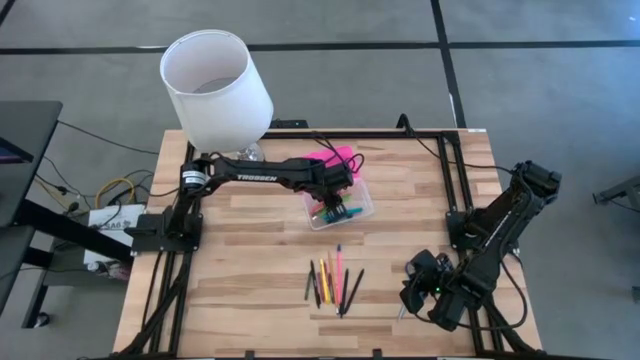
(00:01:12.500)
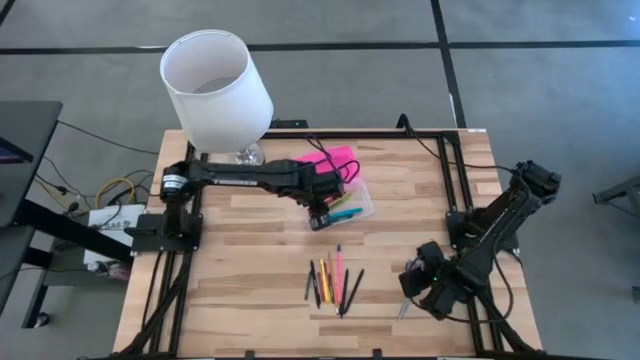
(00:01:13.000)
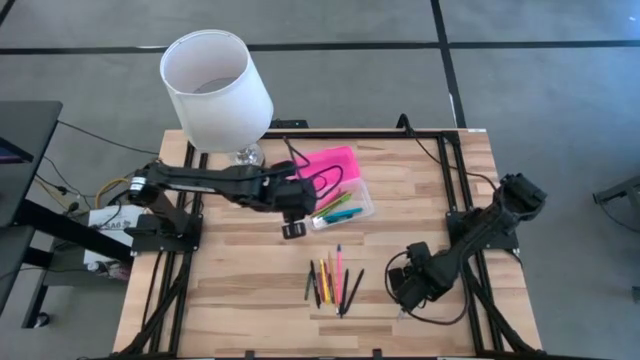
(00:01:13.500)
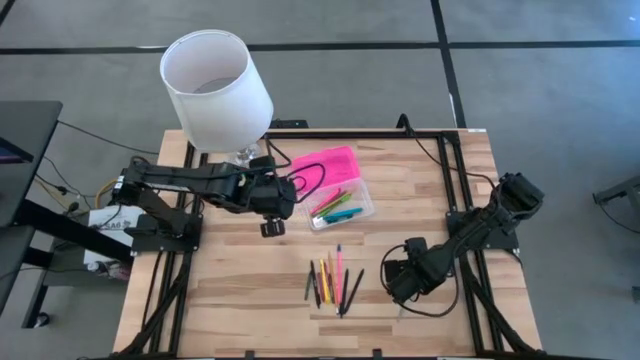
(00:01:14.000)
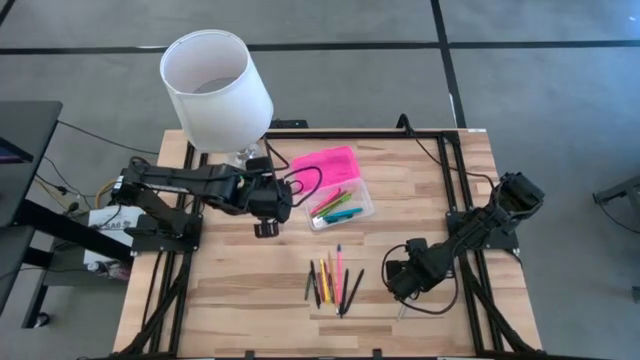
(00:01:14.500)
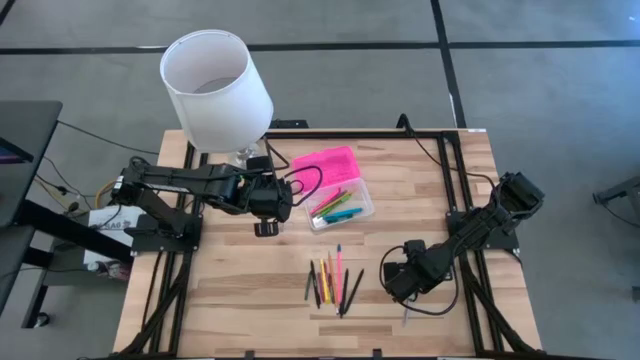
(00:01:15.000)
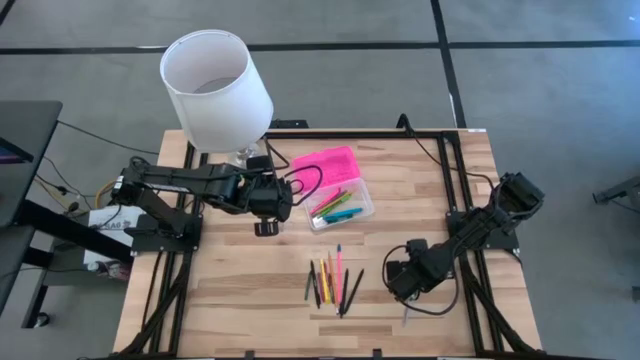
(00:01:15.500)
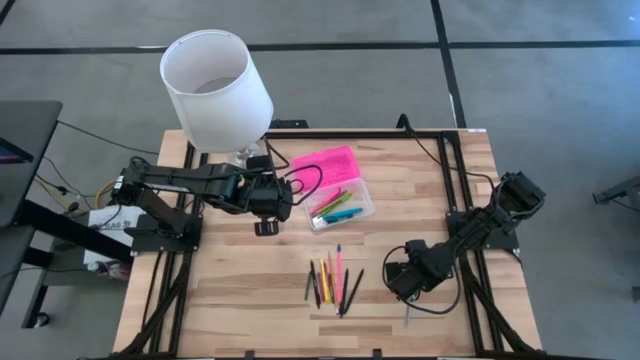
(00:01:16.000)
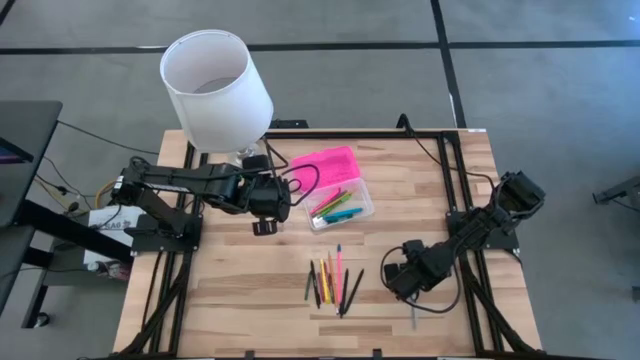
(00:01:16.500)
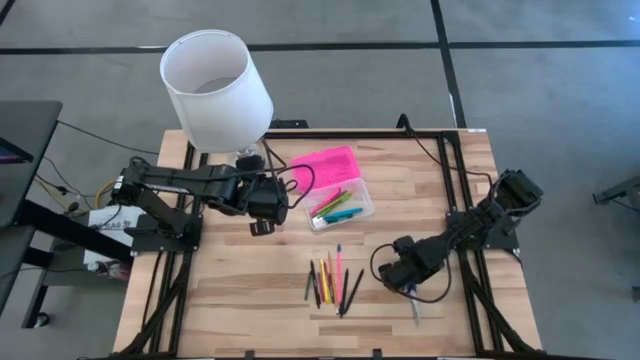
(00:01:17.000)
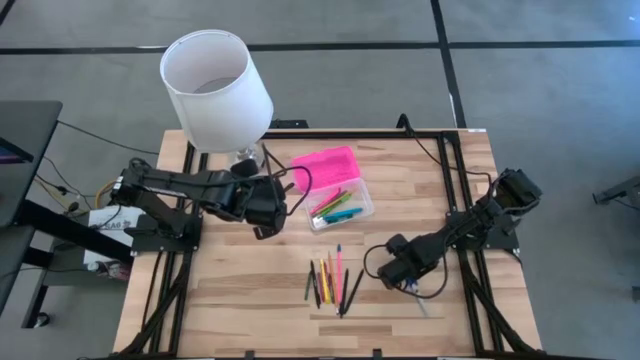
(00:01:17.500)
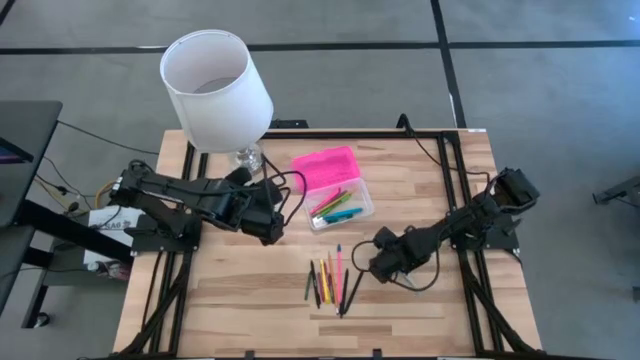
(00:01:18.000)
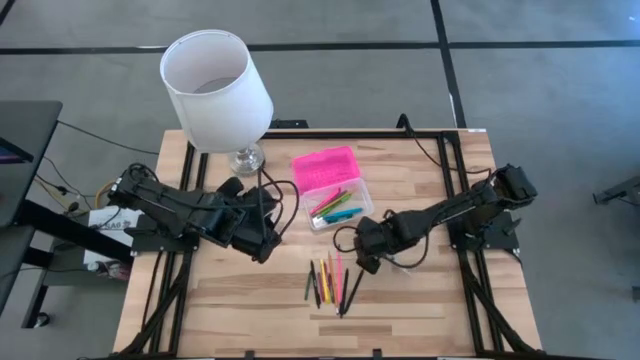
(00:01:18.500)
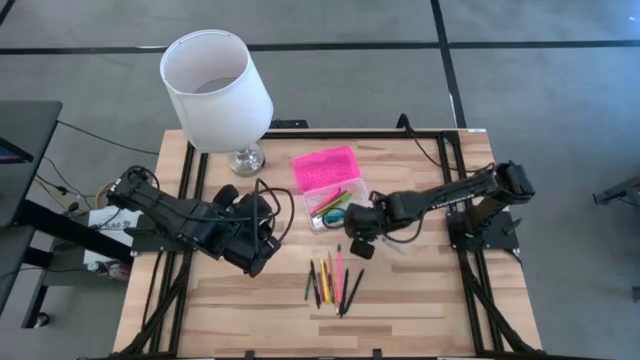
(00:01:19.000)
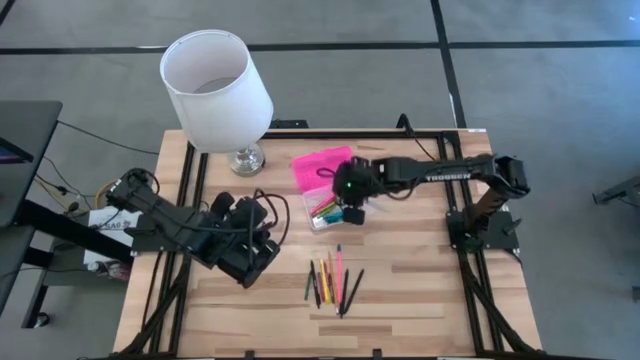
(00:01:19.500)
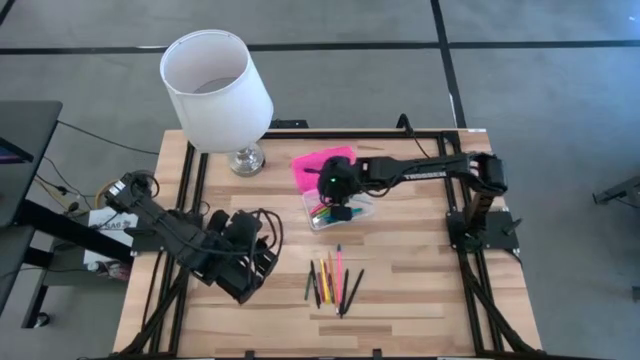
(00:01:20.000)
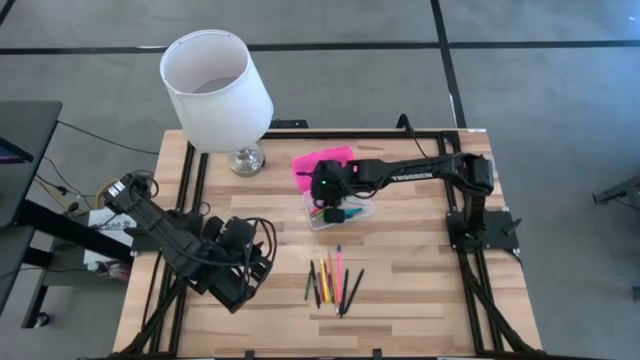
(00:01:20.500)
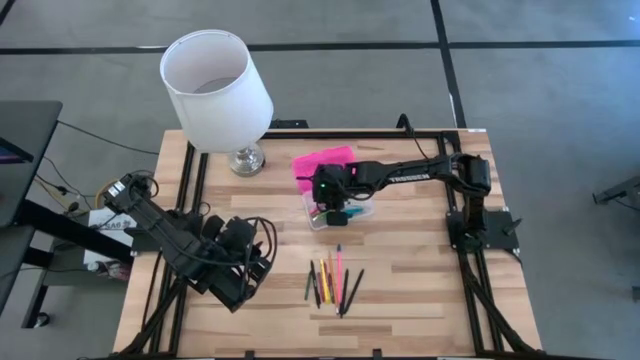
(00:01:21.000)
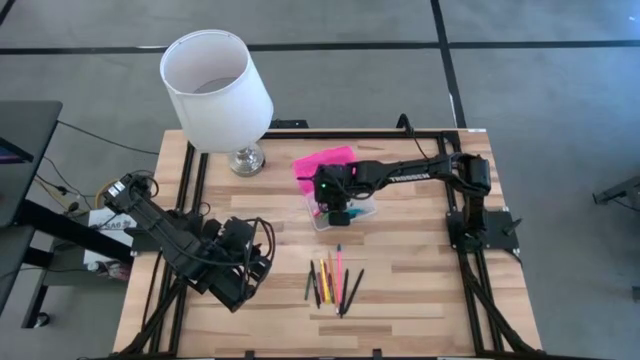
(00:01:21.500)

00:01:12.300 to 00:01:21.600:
Task: Pick & place school supplies into a supply box
Put the blue scissors into the pink supply box

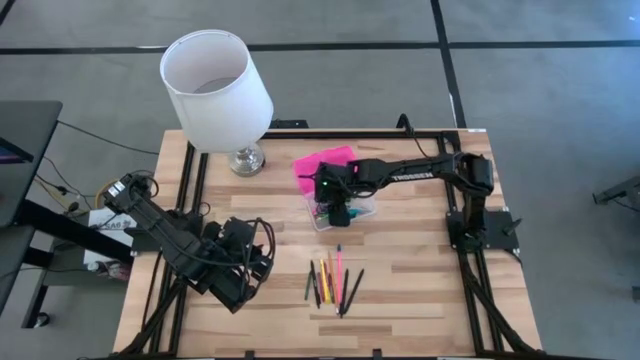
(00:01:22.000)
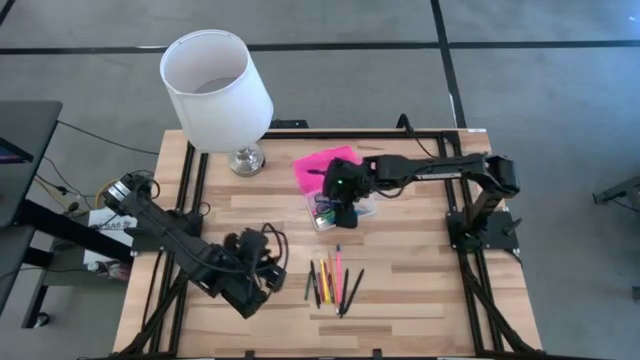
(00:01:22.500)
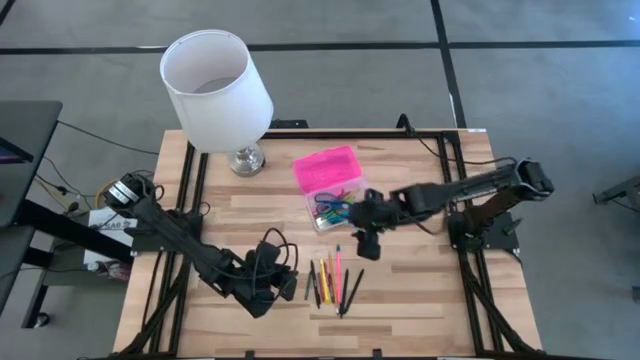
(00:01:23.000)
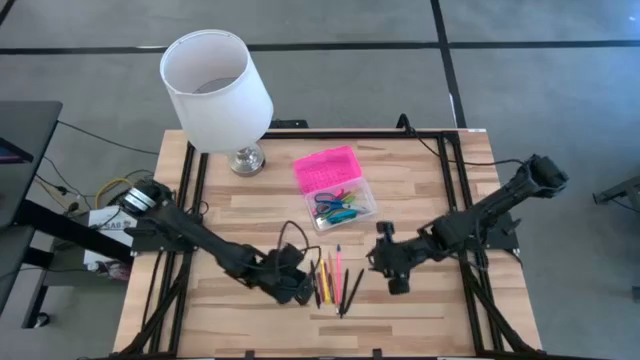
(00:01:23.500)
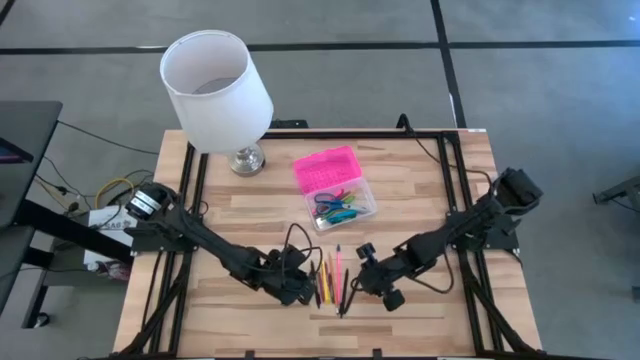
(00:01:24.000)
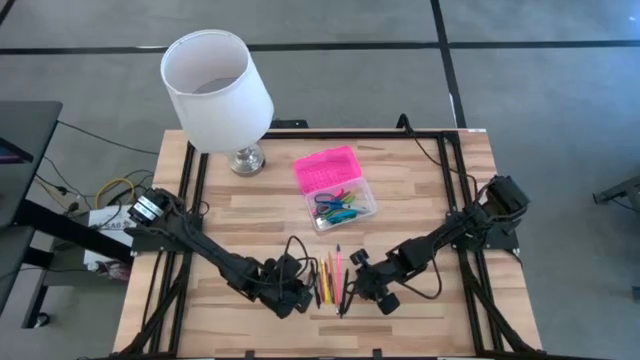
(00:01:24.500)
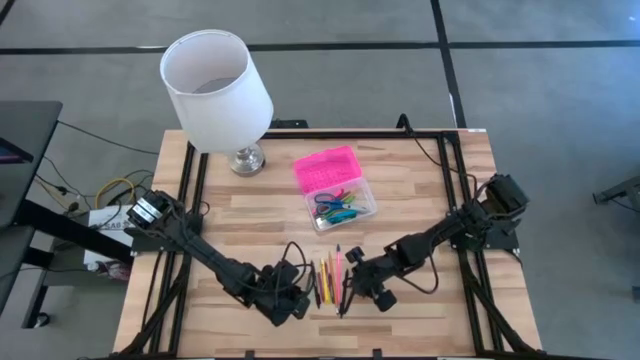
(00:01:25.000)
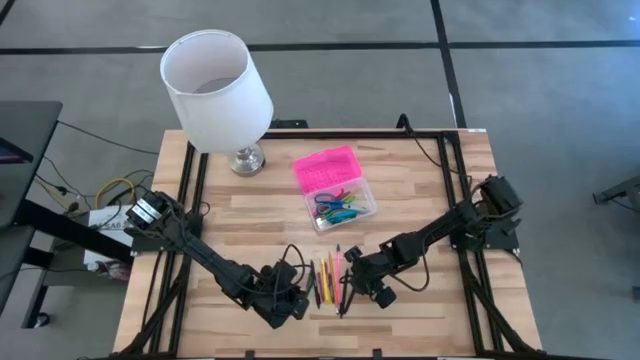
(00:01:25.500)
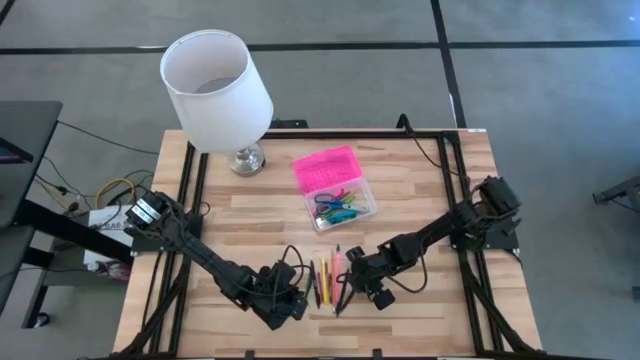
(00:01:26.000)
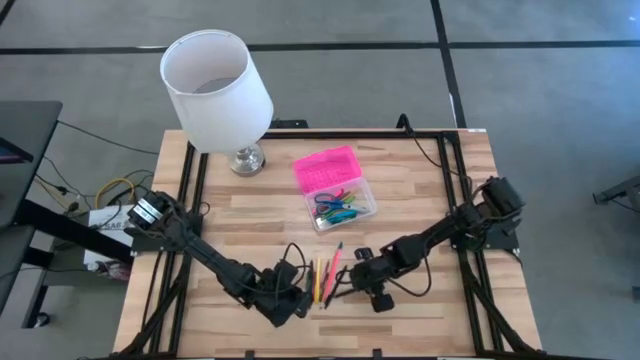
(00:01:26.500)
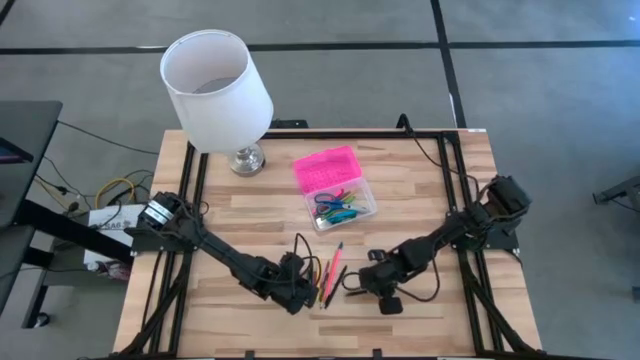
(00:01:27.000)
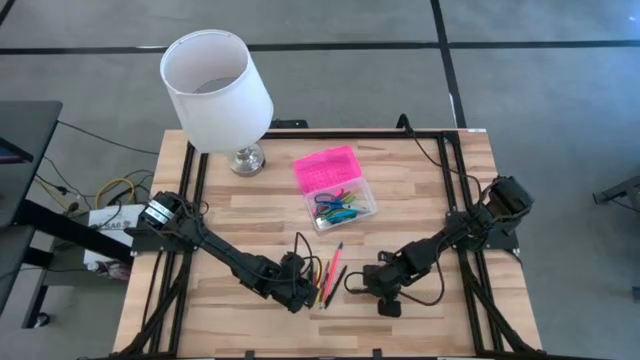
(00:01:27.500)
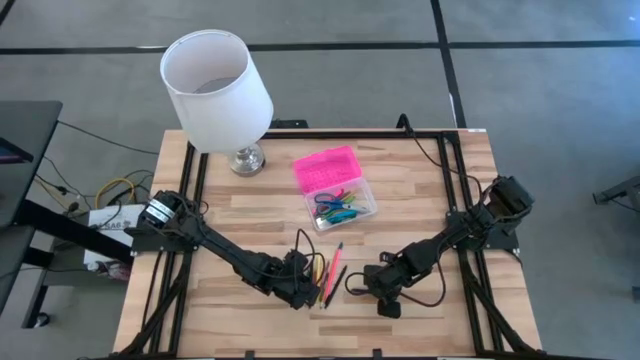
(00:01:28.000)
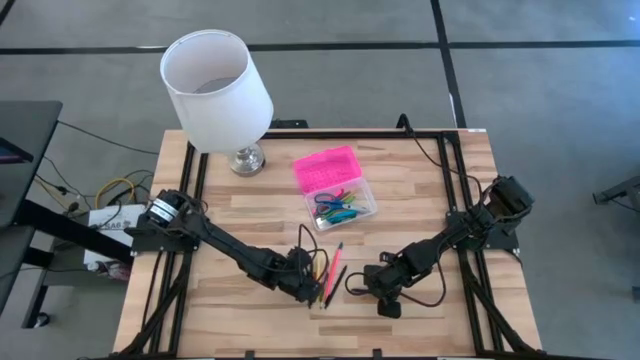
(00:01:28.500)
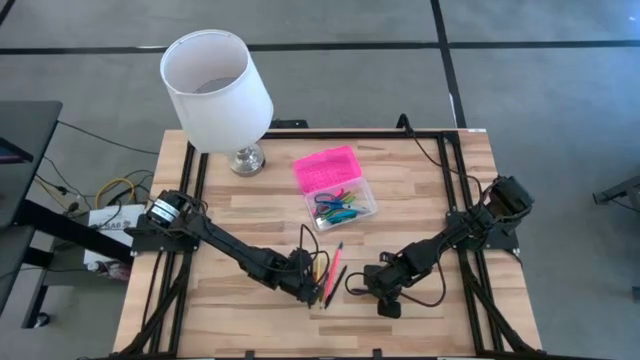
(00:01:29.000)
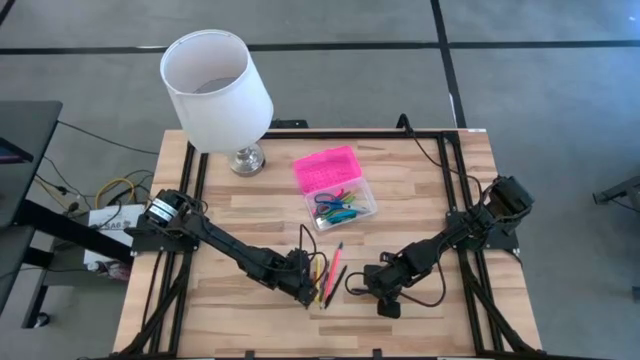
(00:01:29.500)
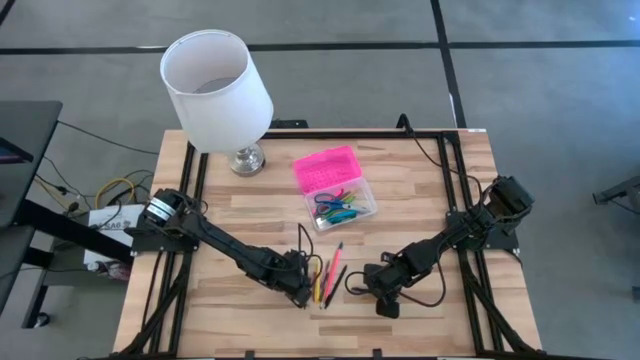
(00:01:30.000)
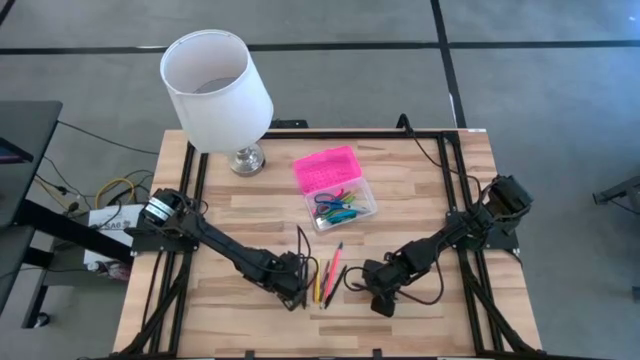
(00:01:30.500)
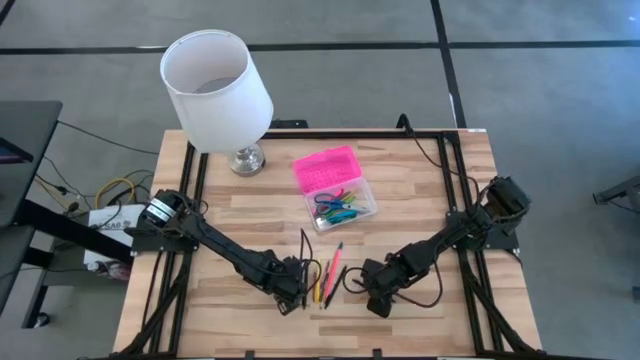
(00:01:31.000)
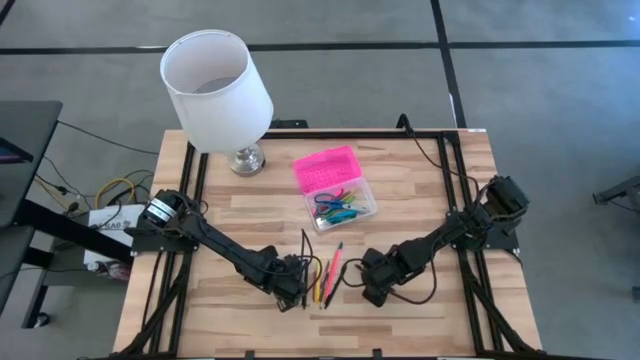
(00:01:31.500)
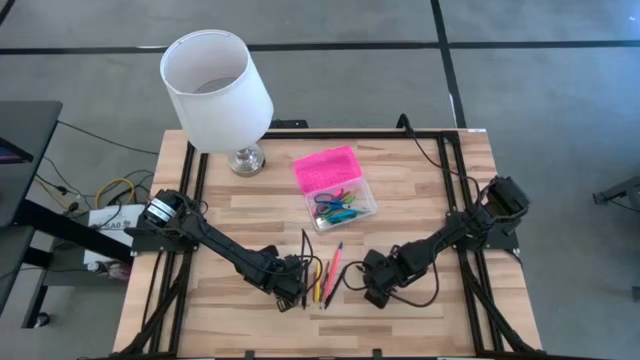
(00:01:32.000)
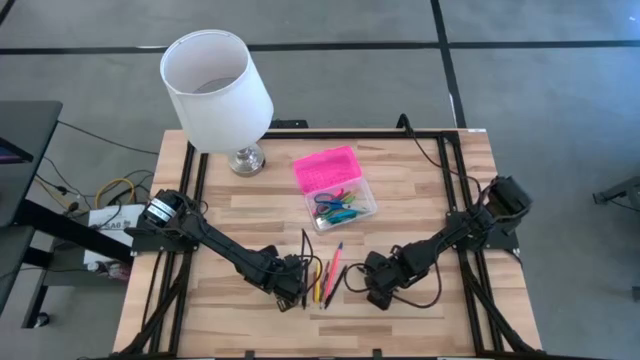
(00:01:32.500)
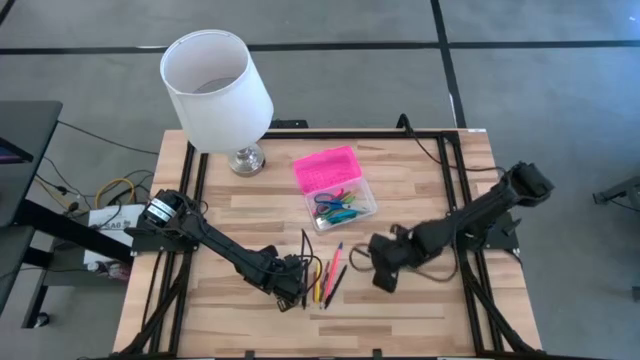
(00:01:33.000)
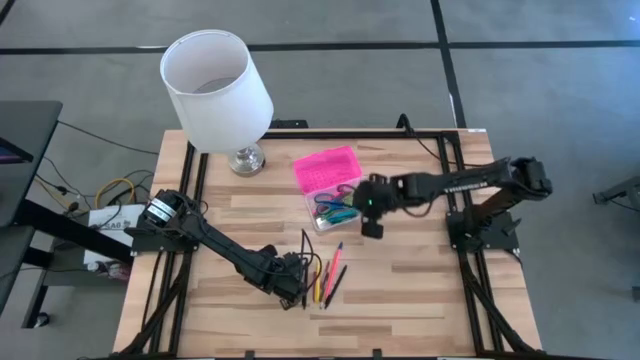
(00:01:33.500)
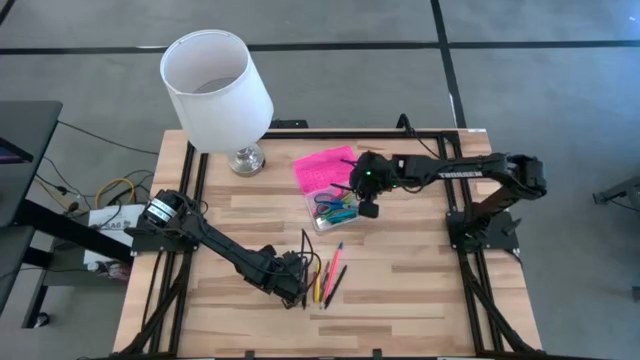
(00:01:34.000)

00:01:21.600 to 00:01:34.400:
Put the right black pen into the pink supply box
